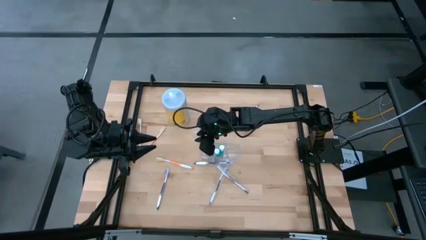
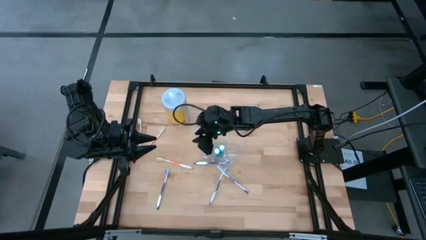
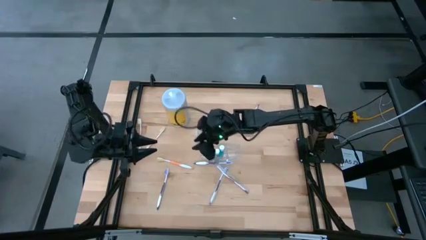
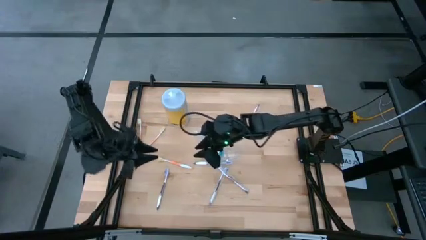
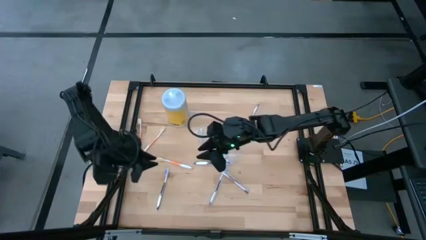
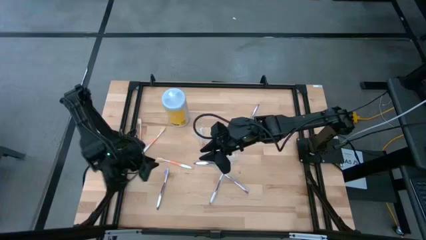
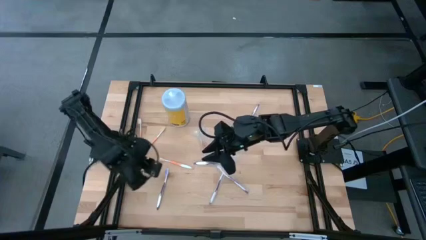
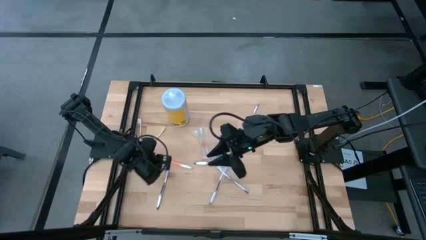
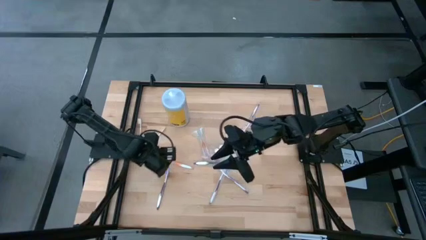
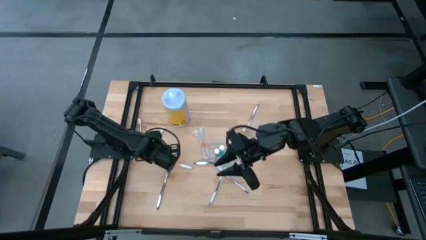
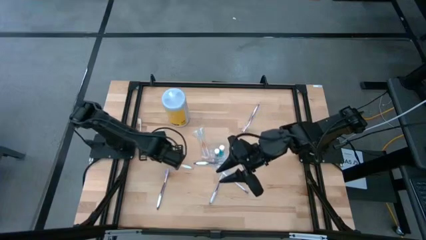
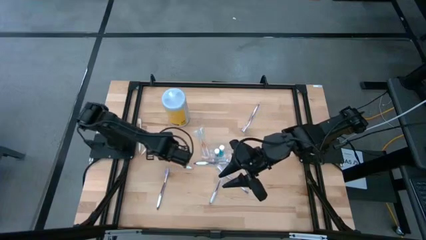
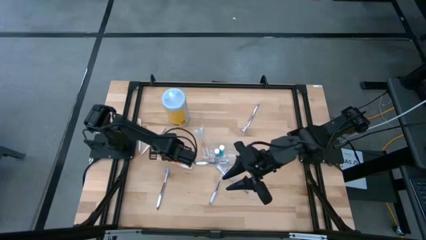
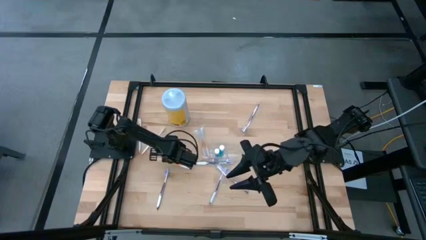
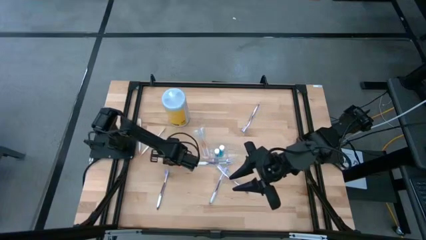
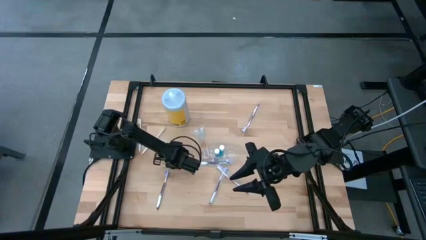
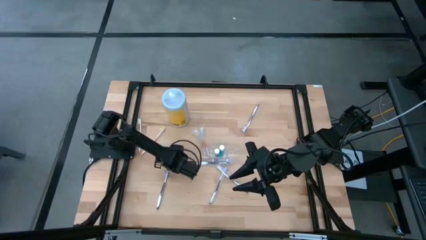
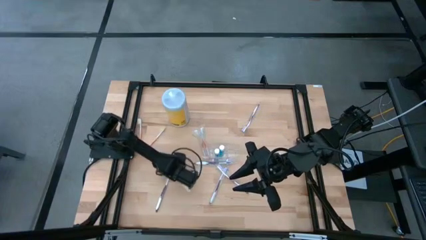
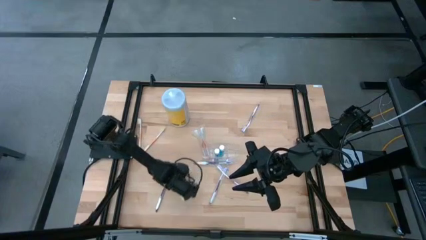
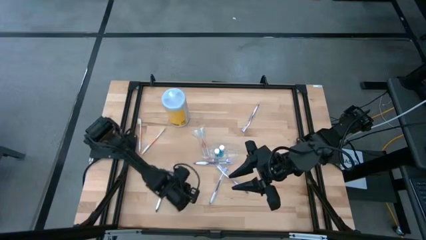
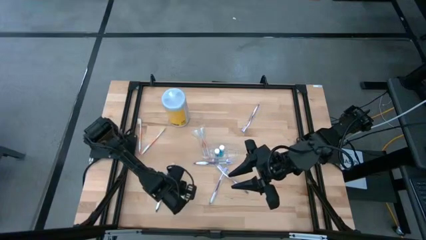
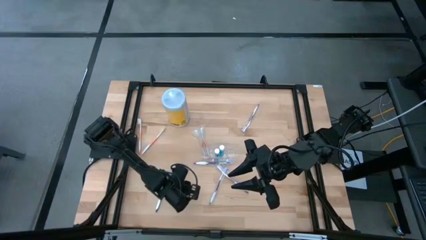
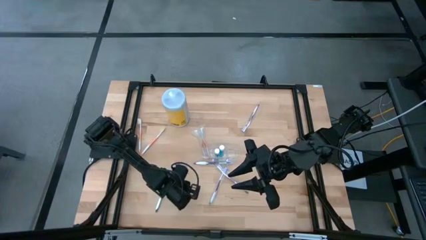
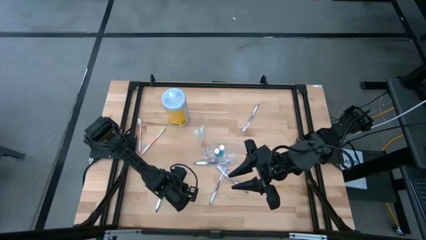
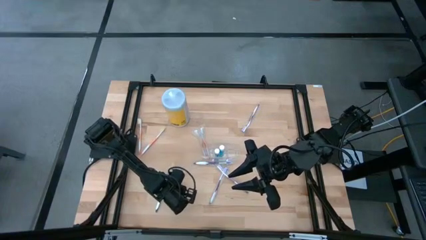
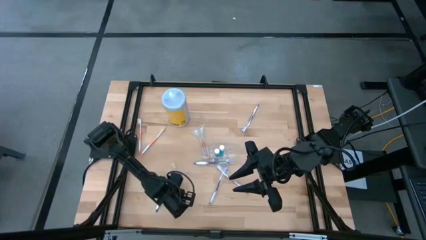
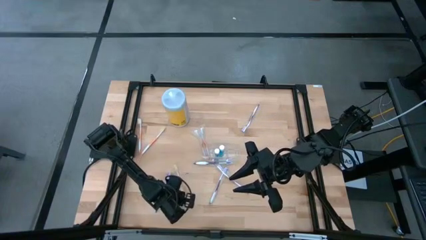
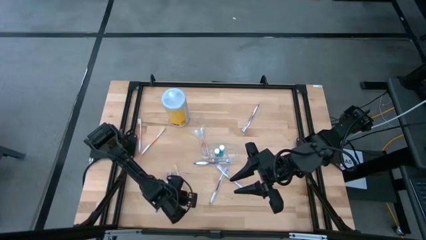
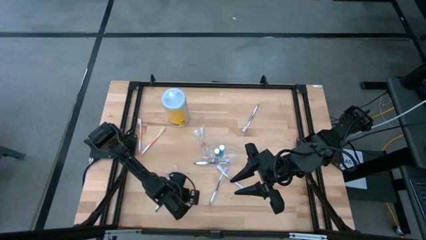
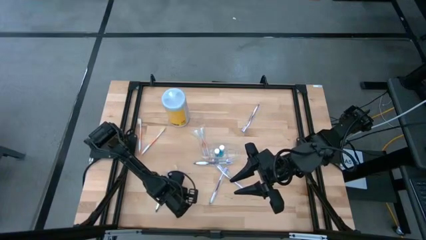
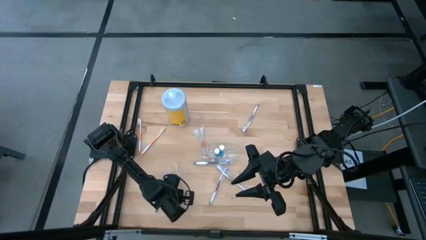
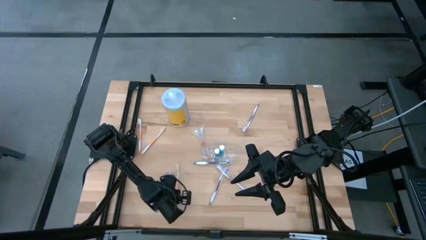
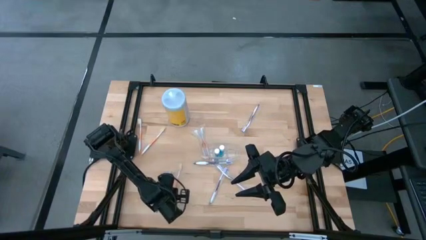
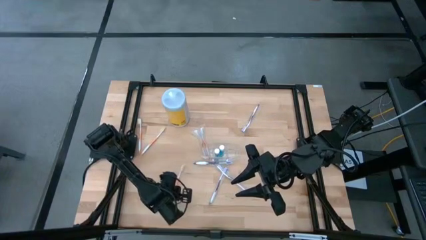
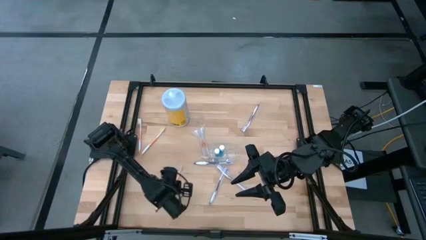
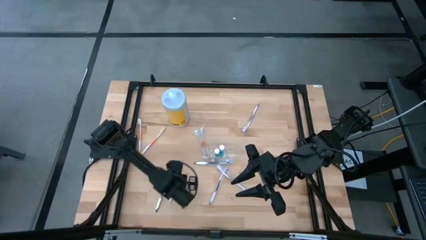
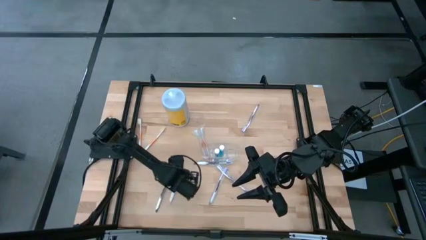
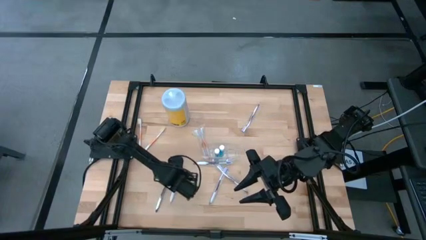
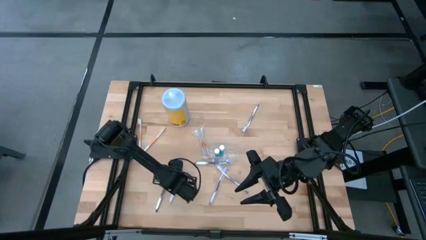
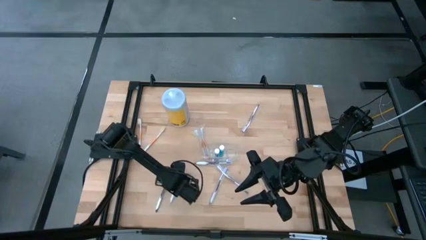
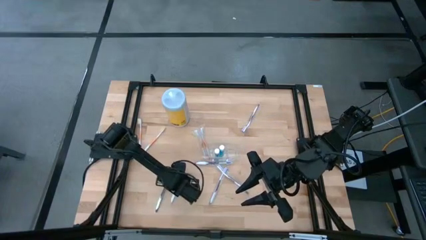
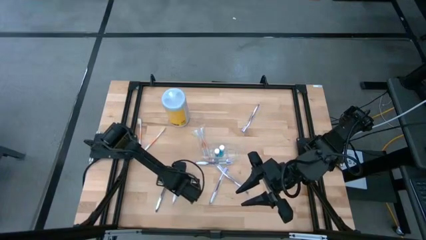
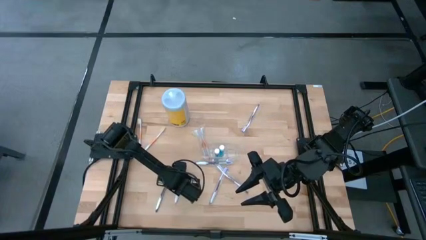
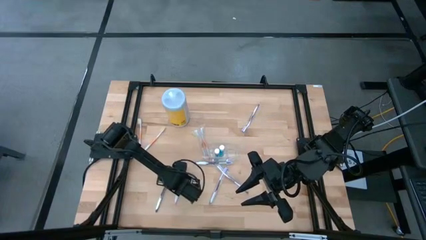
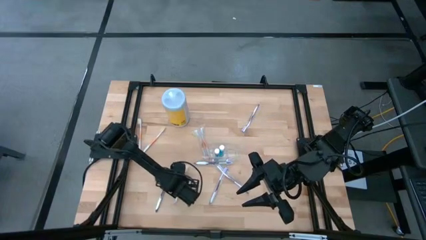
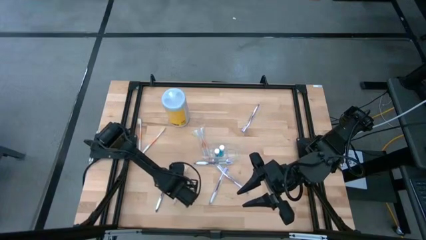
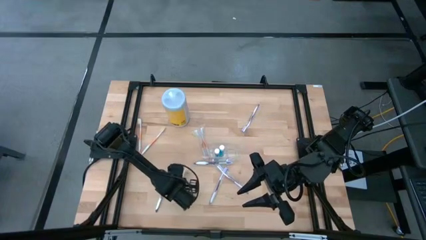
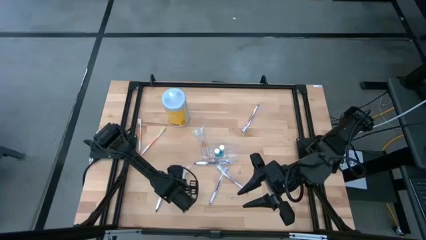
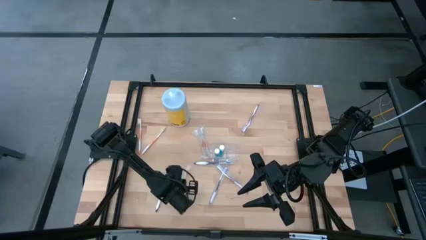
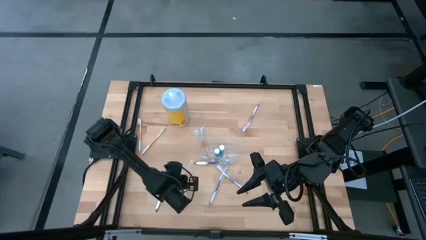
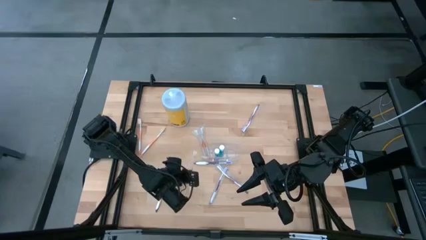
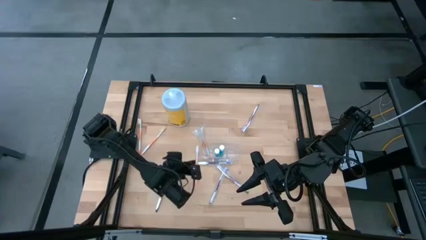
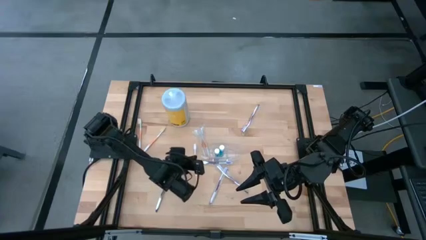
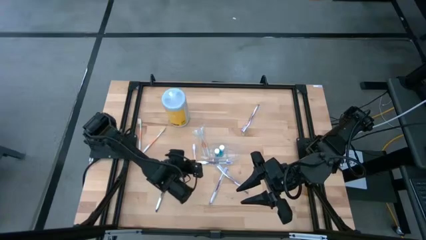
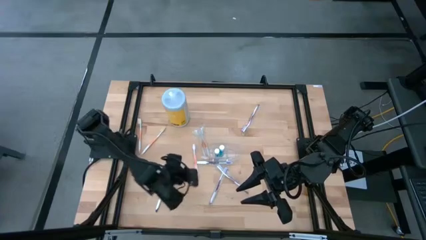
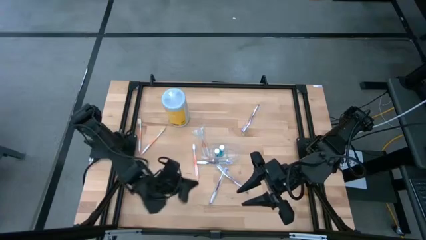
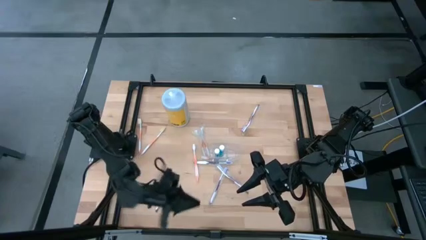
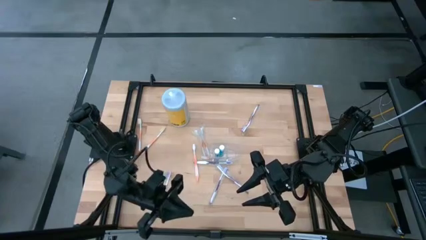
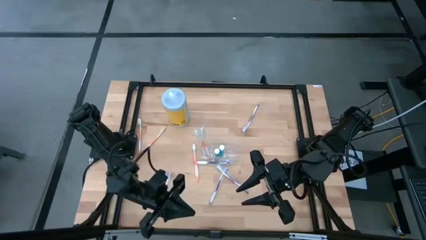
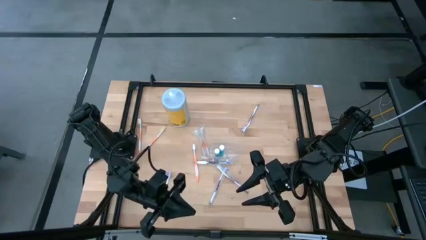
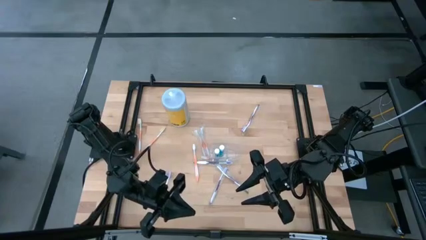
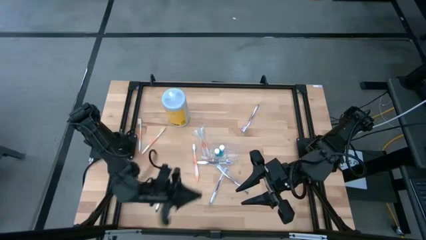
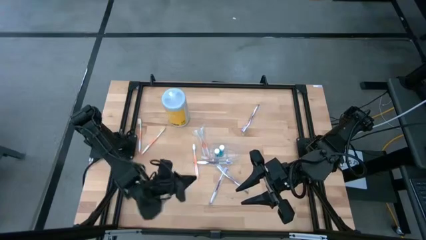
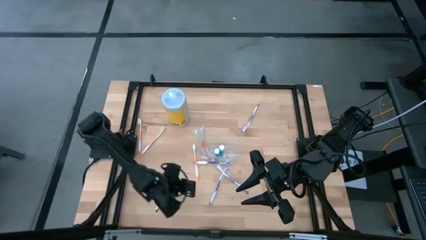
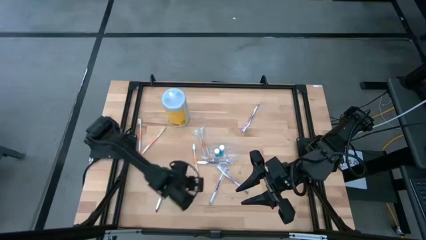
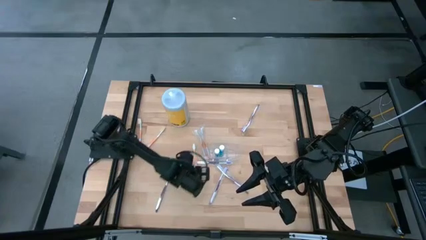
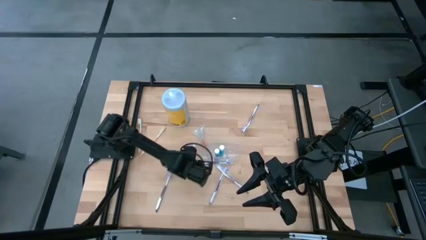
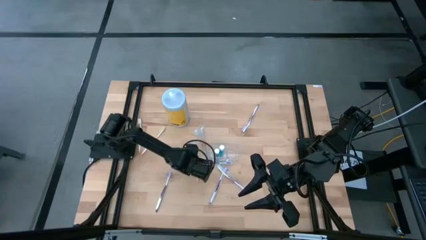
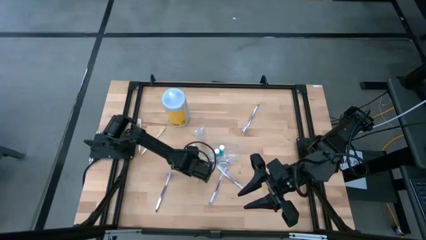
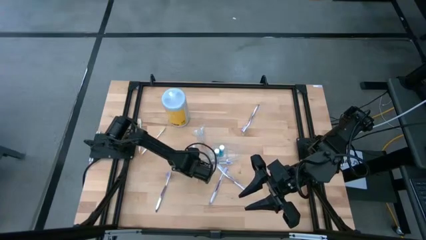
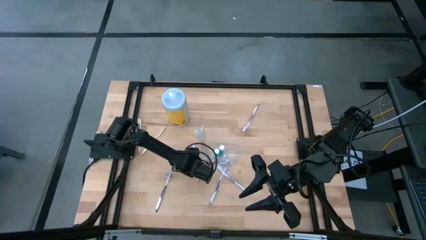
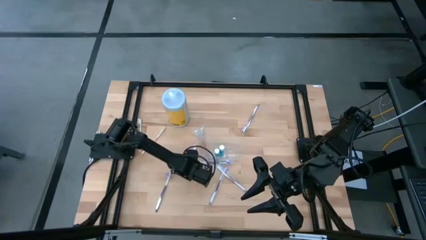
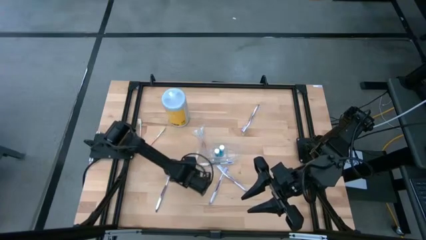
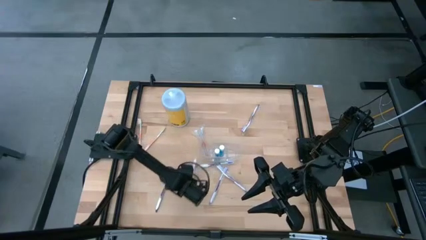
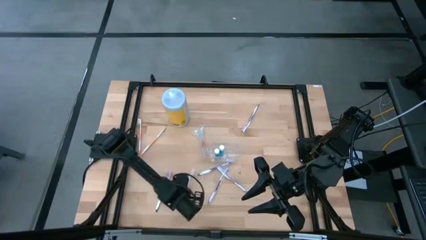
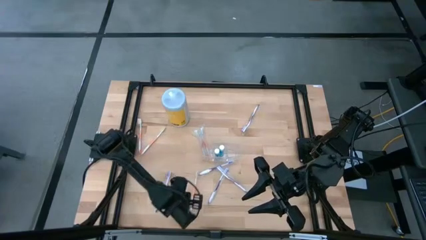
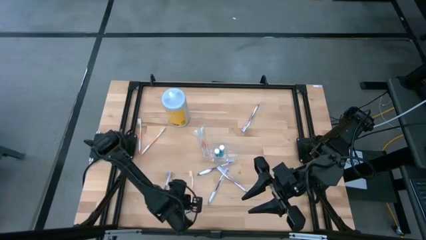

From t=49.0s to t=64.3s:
Task: Pick & Place toothbrushing station
Put the white and orange toothbrush into the left compartment of the transparent organizer
